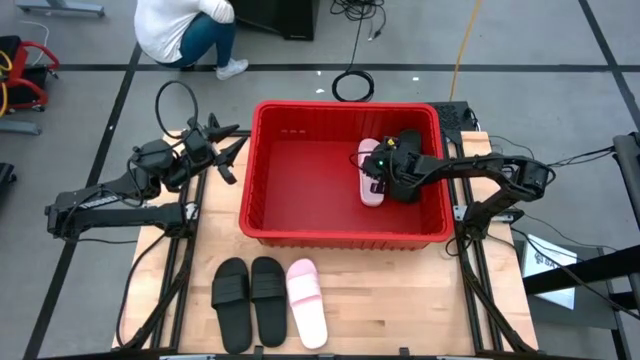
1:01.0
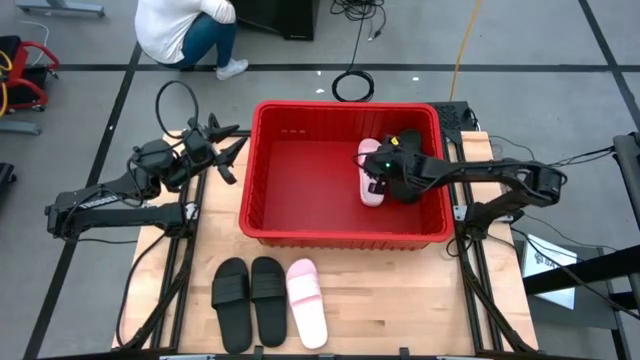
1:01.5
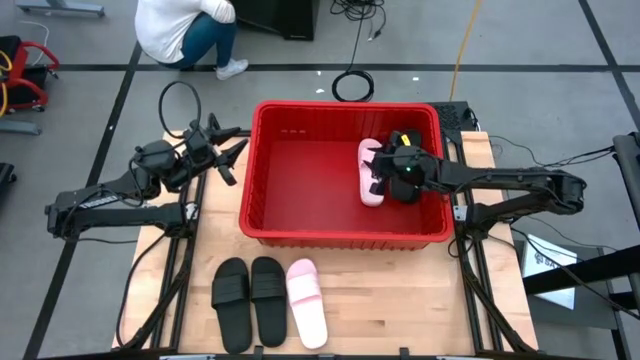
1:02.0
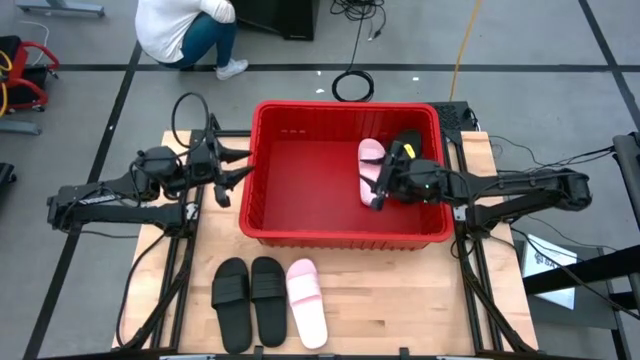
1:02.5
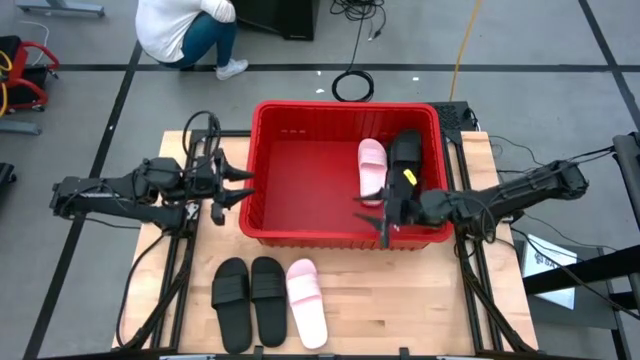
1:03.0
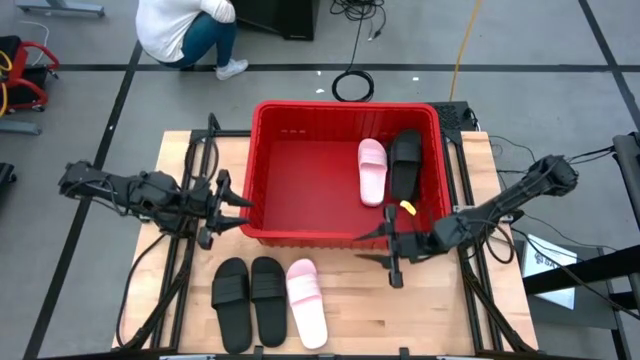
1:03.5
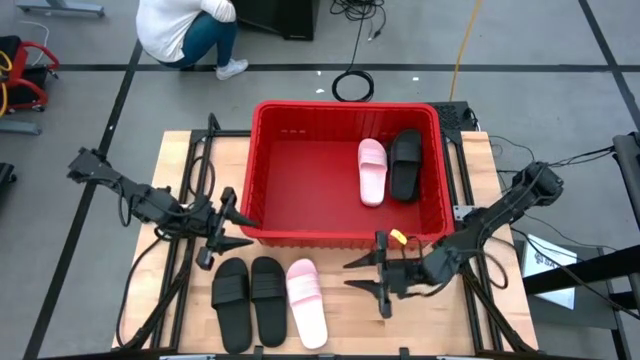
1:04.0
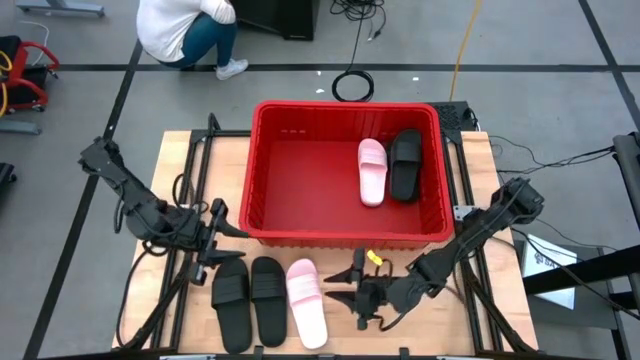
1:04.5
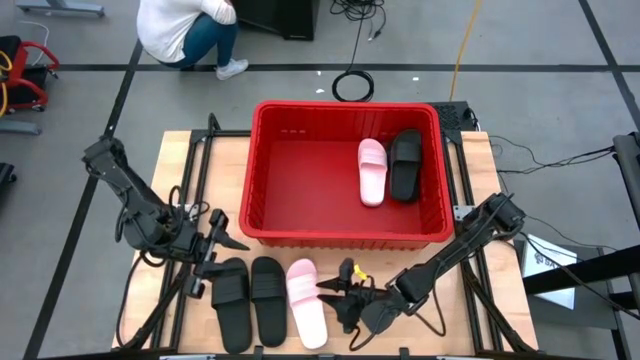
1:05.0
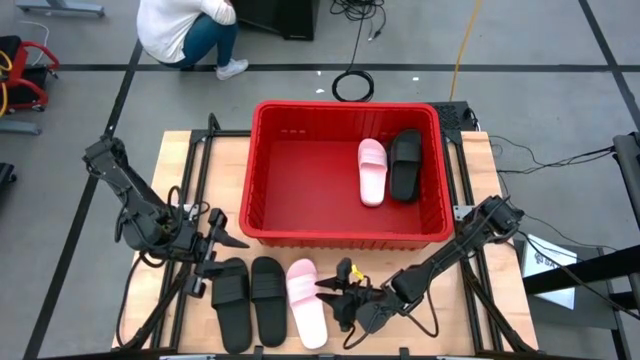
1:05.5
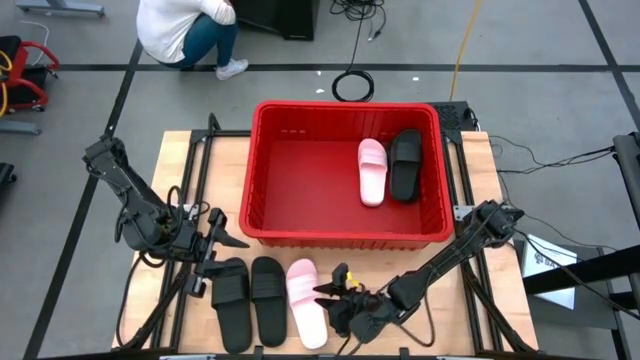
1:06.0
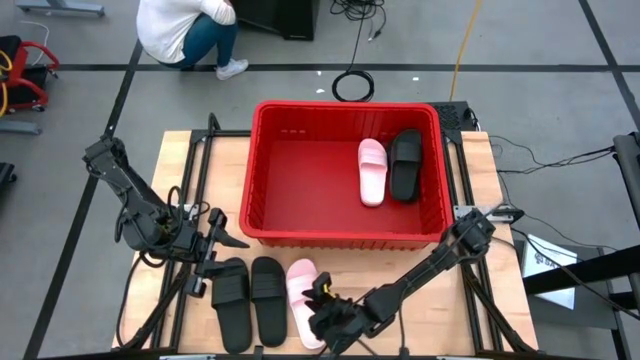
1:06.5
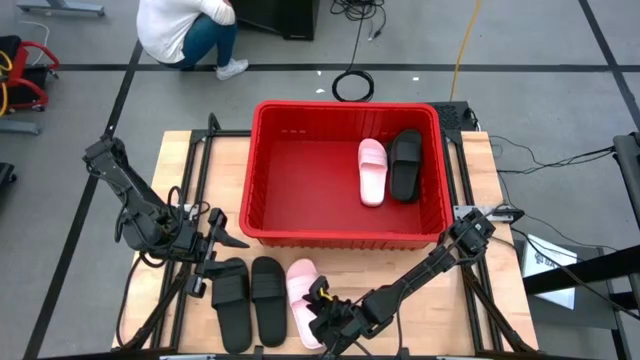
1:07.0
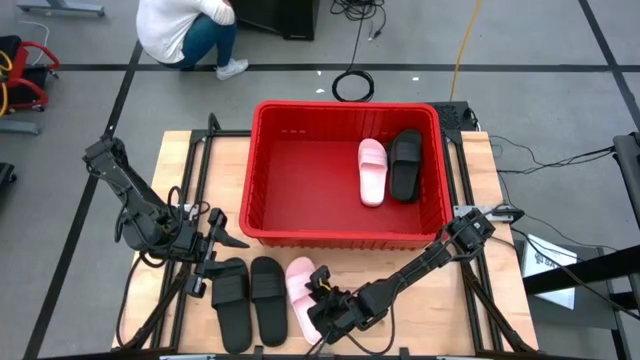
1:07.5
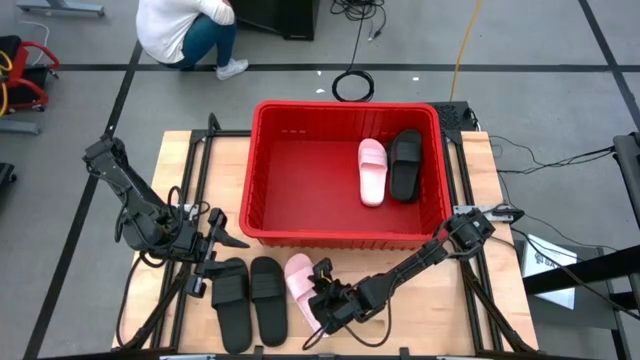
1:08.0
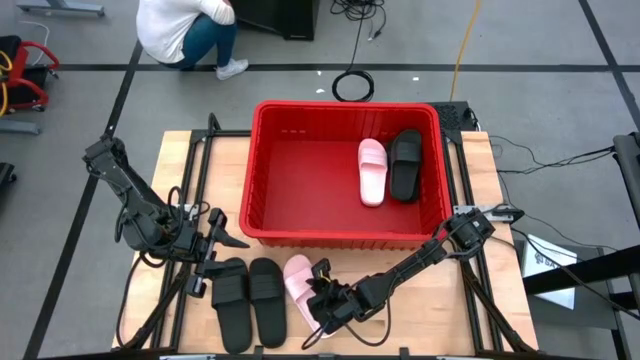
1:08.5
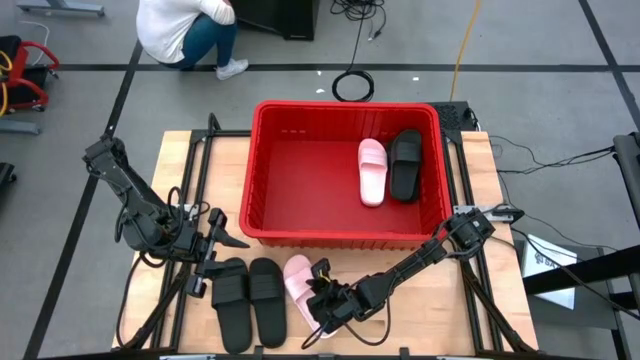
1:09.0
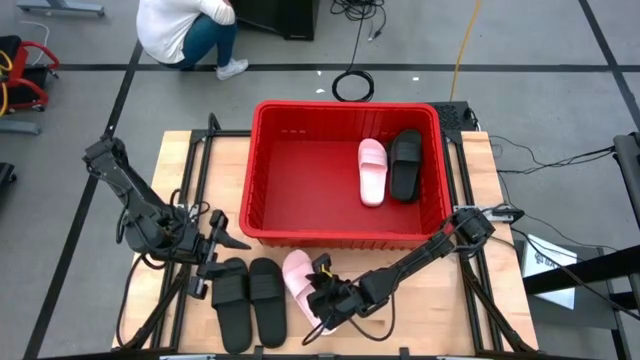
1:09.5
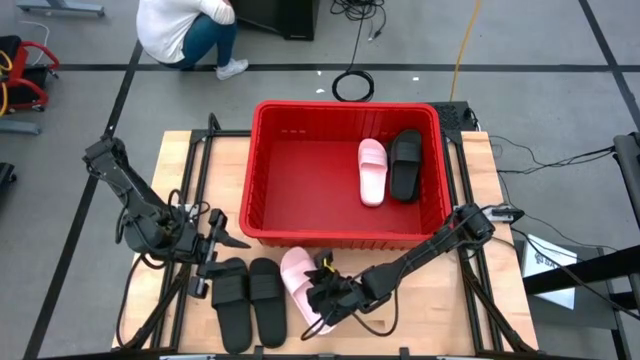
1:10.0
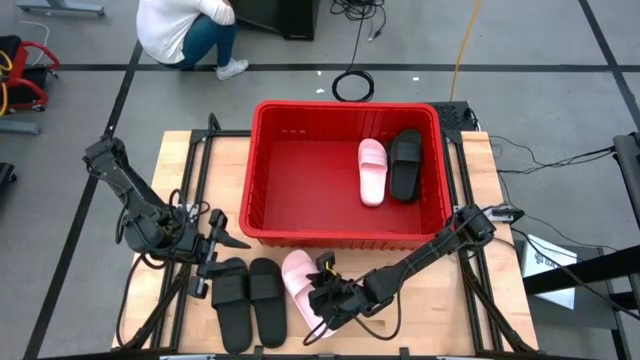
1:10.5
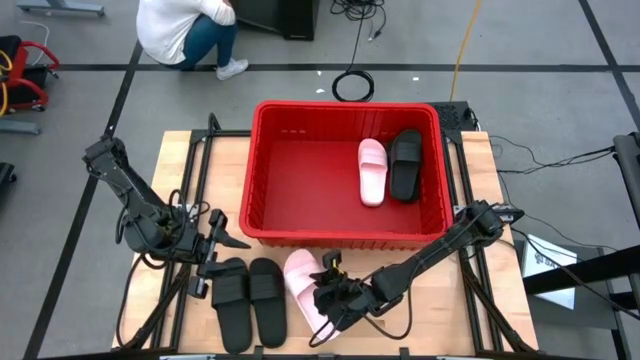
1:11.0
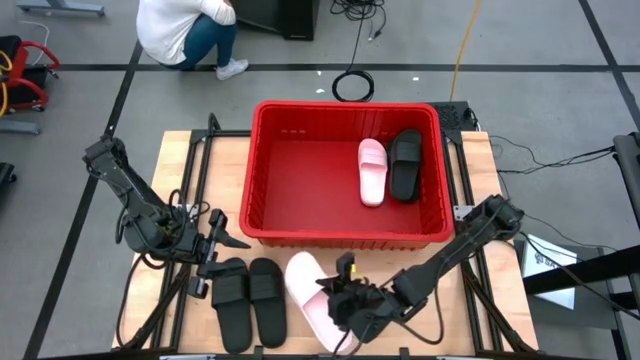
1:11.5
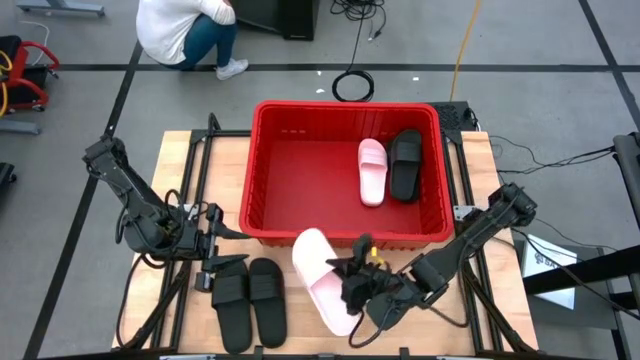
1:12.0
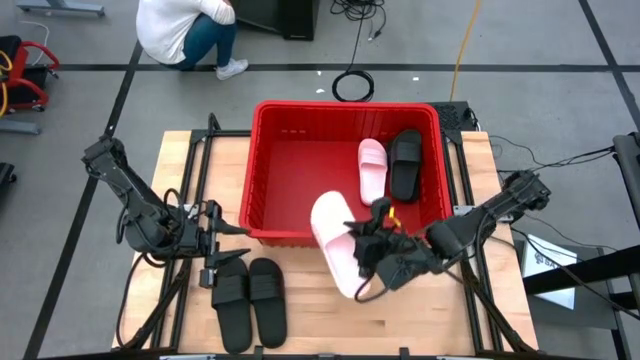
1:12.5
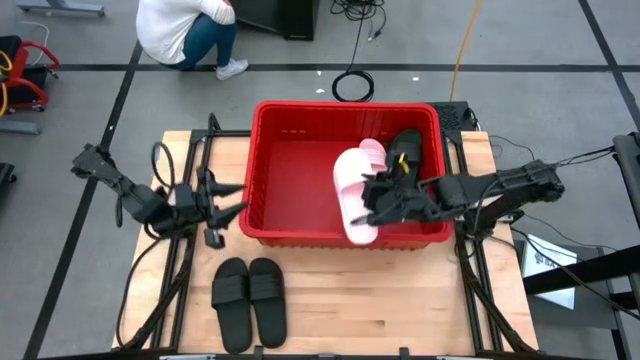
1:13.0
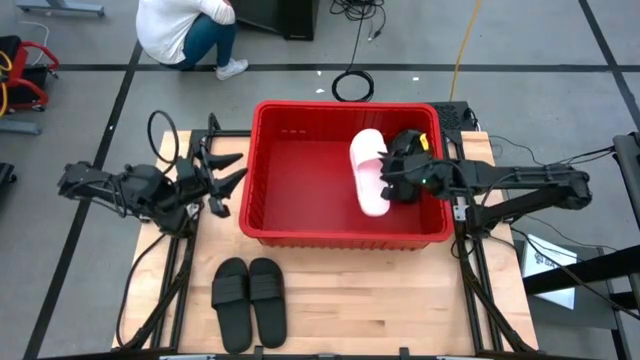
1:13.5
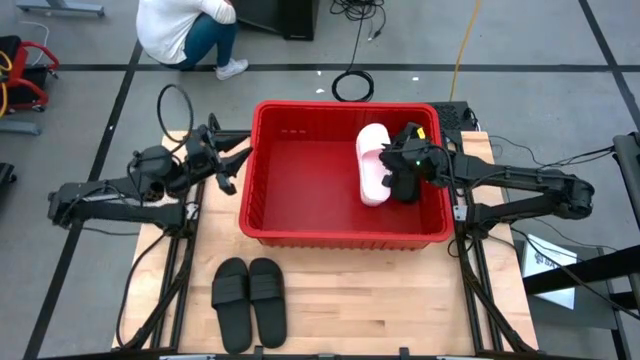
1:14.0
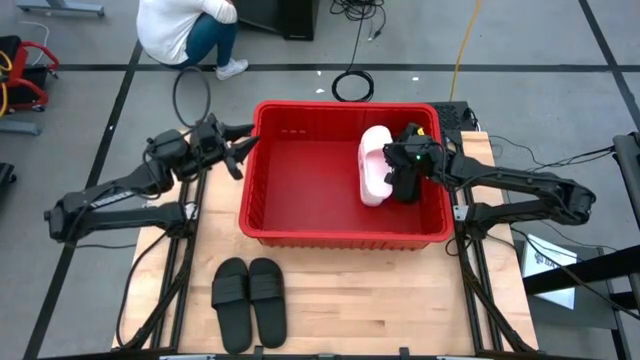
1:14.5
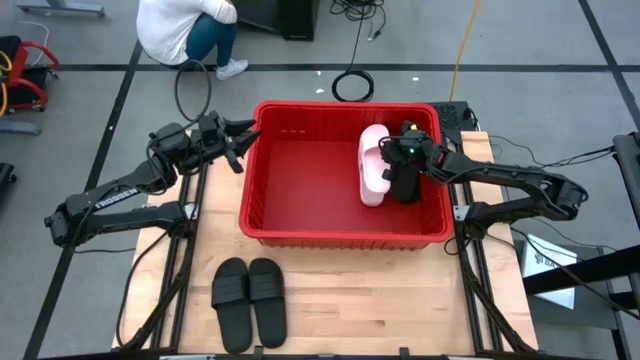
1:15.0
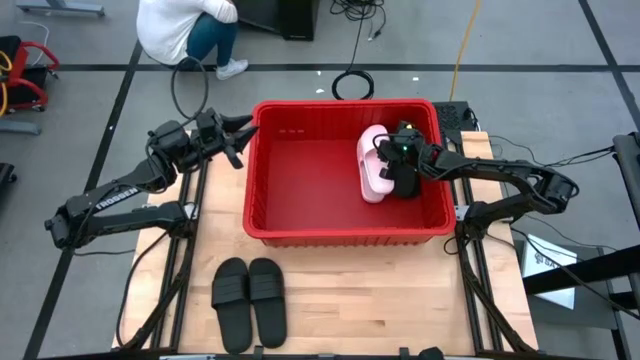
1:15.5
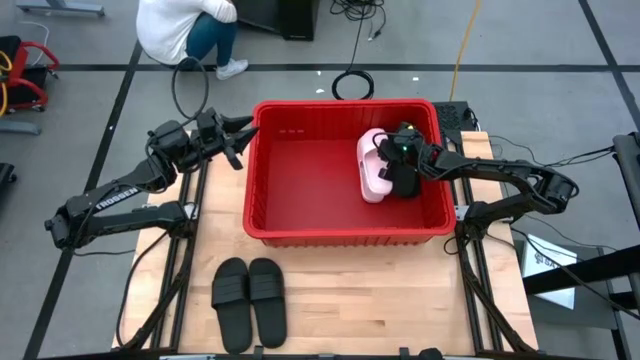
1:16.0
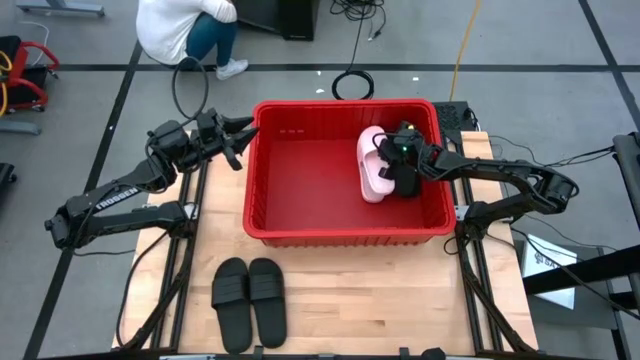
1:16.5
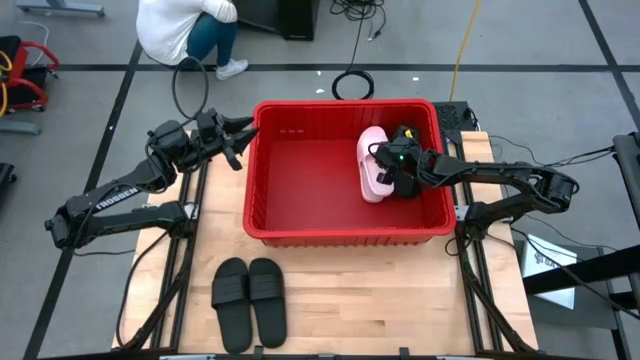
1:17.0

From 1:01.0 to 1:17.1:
Task: Pick and place slides into bin
Put the pink slide into the bin
